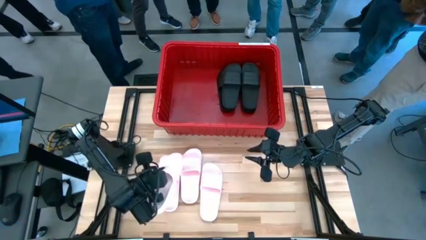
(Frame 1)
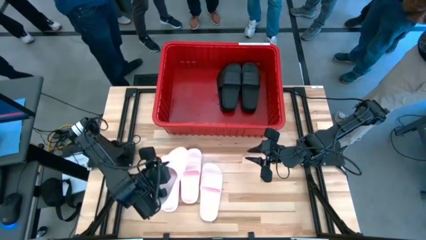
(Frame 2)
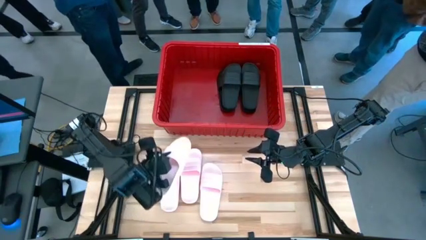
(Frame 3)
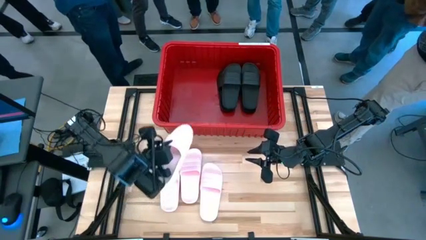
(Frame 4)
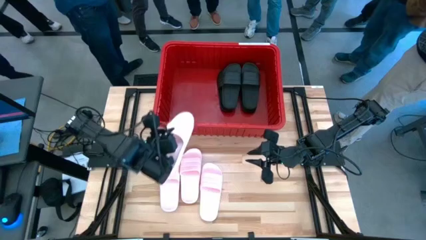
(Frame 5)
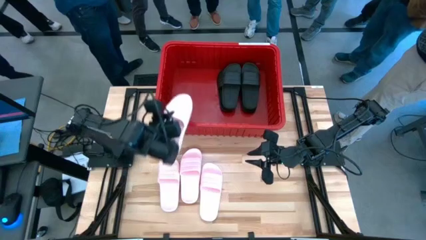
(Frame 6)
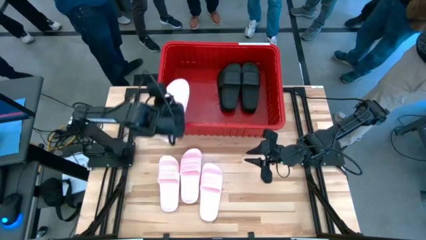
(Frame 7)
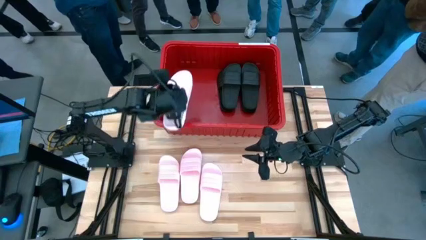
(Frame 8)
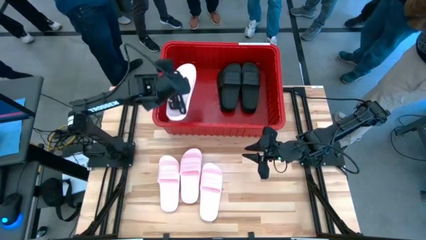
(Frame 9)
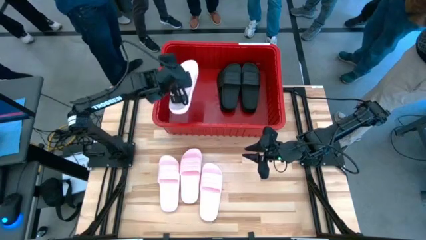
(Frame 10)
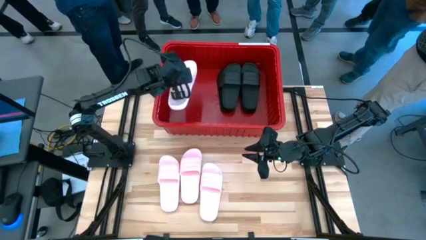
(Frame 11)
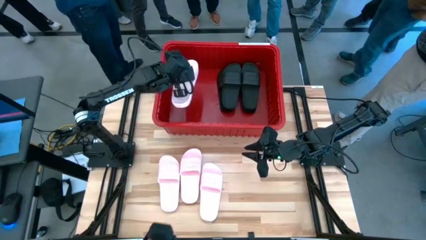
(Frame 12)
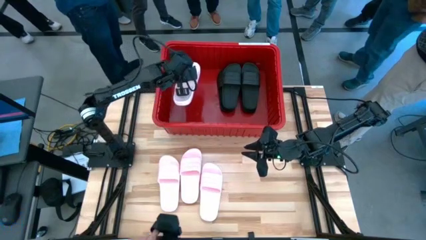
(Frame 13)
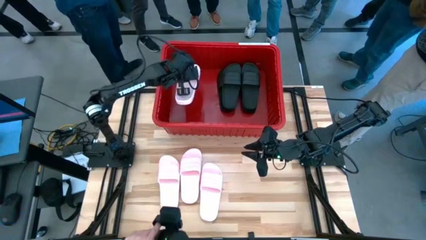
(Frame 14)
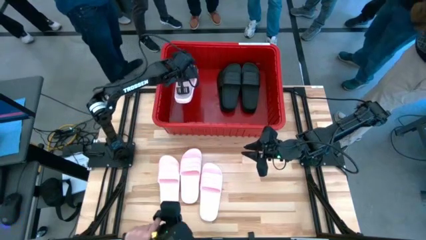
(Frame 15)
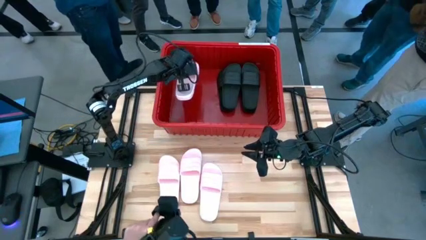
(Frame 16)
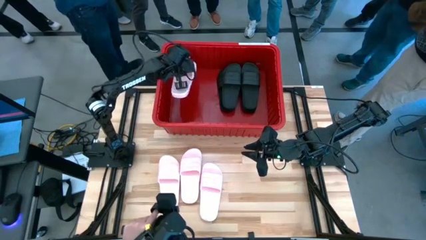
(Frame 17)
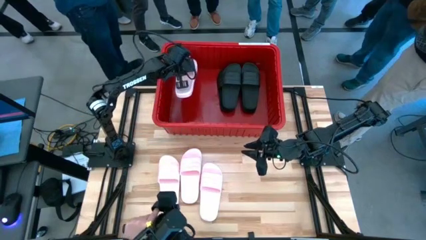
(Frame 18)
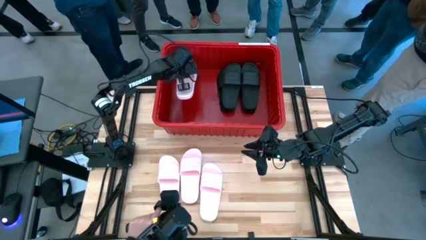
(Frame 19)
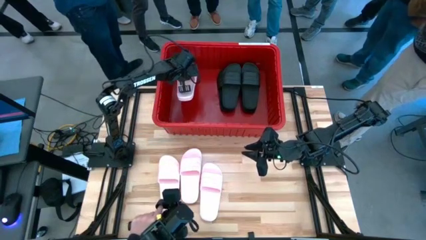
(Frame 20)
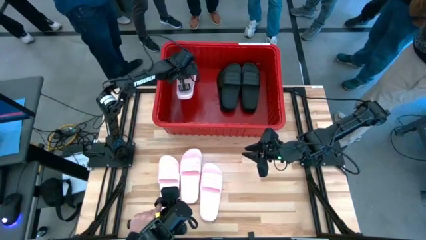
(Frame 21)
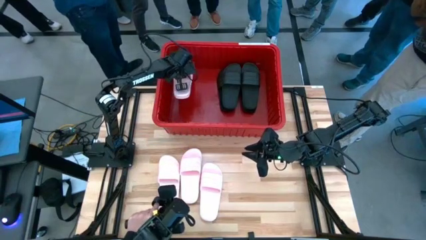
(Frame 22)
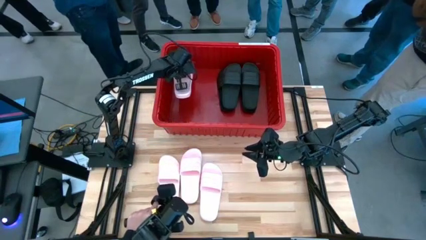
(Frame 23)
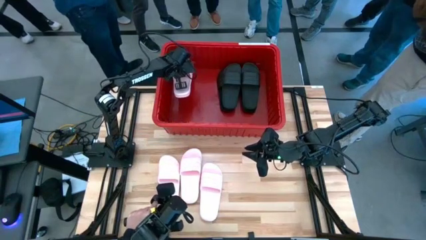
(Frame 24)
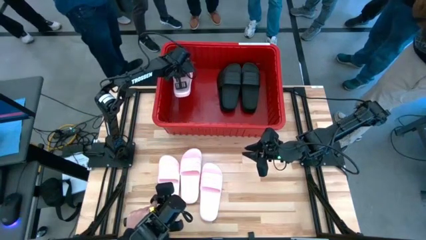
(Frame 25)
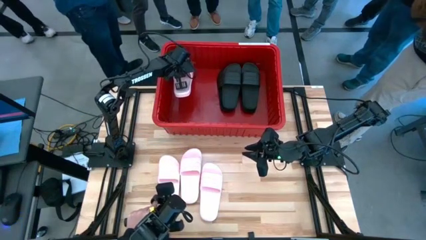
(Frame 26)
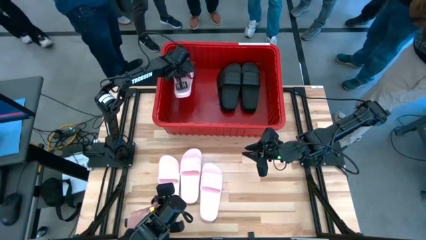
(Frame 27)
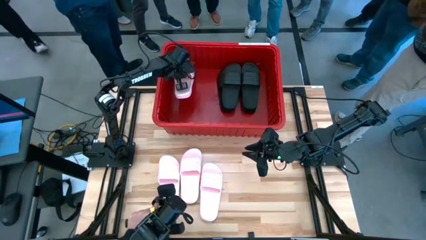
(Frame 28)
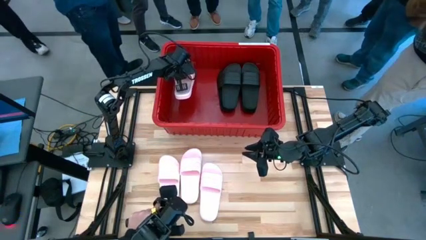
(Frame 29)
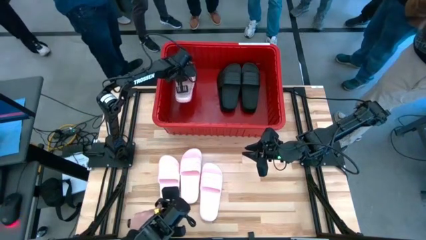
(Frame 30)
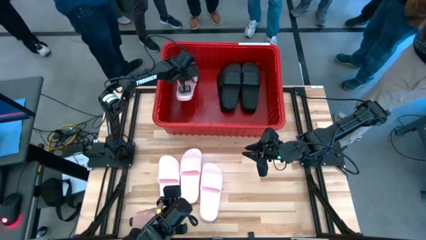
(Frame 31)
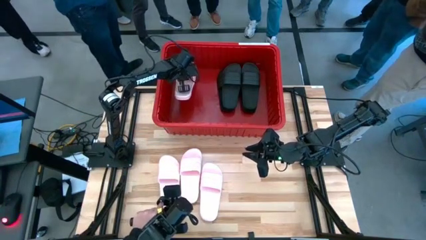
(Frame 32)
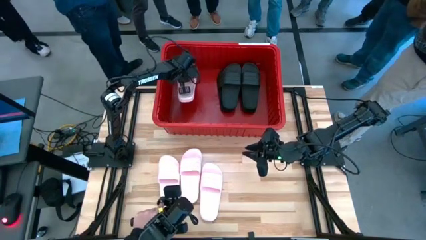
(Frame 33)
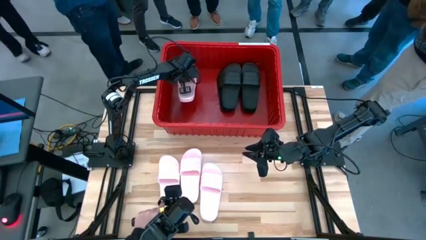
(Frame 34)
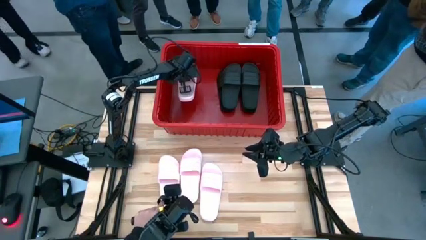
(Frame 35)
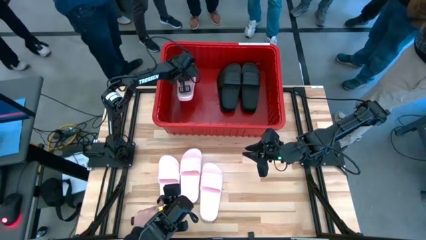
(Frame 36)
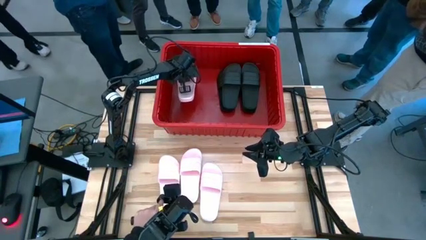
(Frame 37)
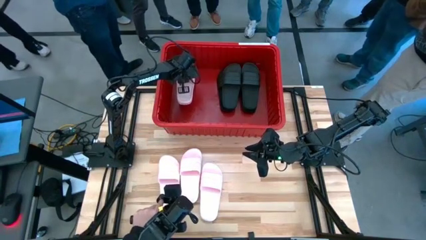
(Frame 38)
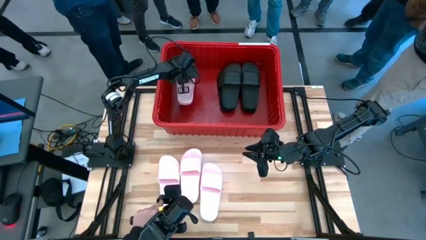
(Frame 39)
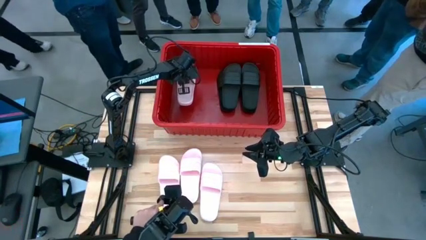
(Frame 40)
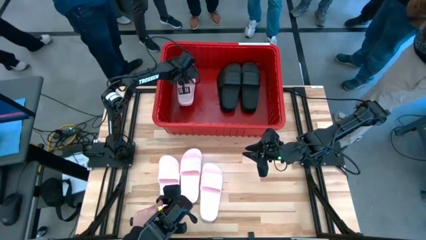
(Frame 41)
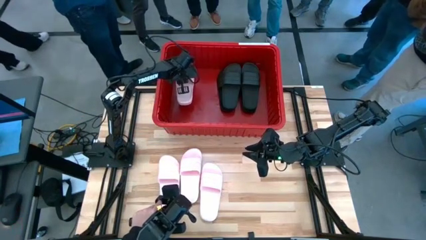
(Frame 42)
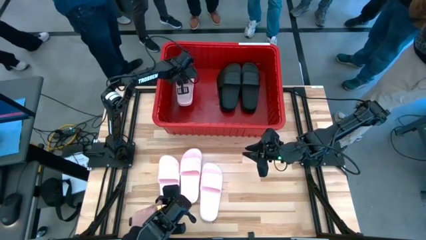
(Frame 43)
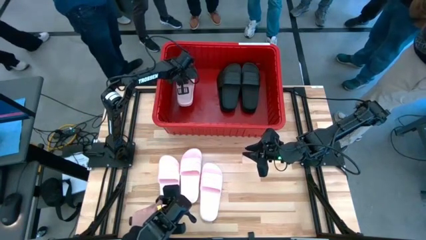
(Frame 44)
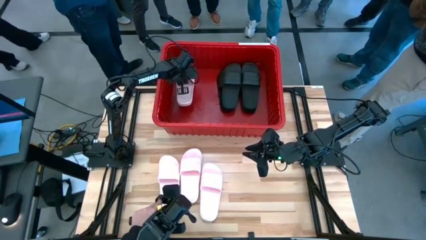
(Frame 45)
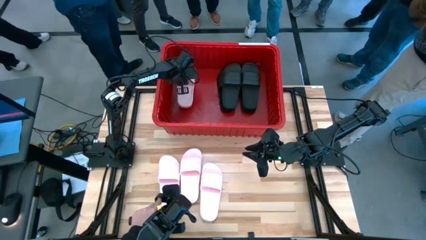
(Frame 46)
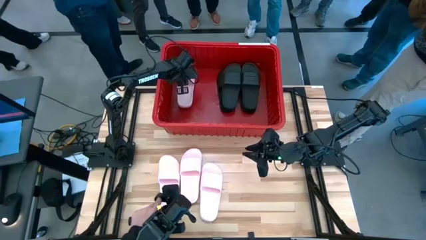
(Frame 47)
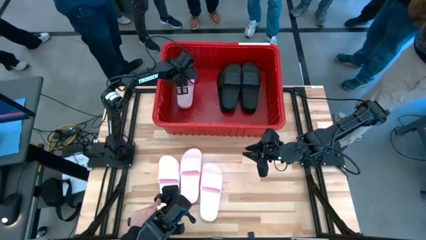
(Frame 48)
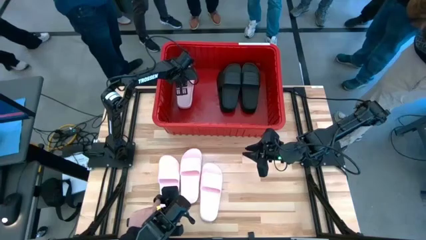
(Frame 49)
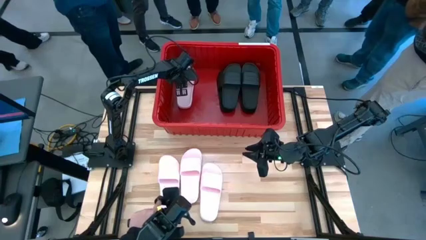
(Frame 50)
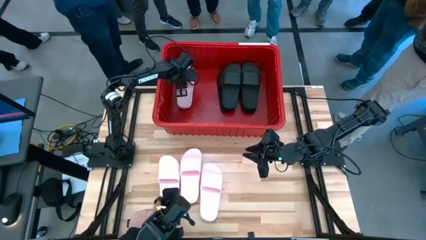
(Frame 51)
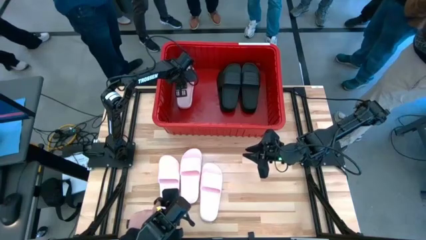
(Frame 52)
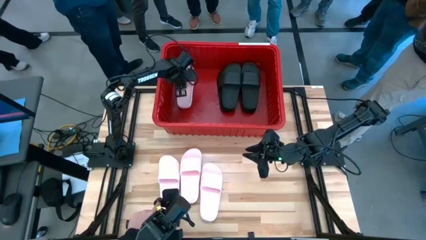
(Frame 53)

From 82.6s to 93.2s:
Task: Pick and place slides into bin
Put the pink slide into the red container

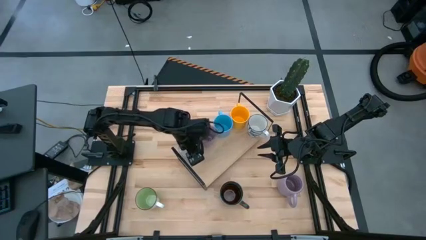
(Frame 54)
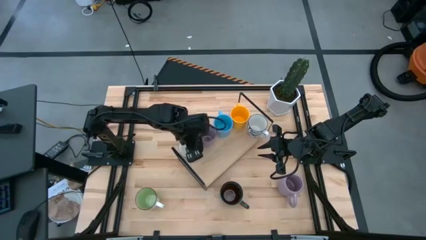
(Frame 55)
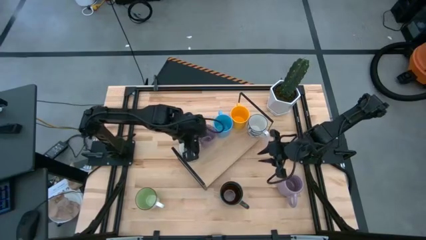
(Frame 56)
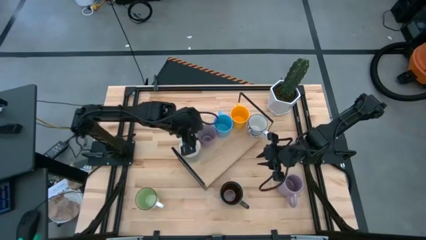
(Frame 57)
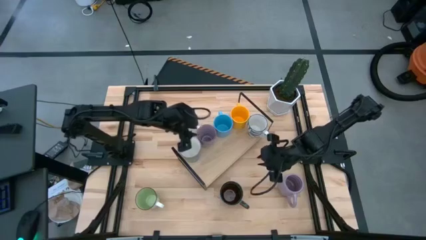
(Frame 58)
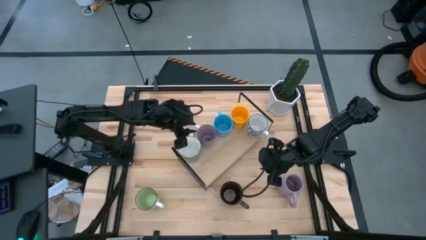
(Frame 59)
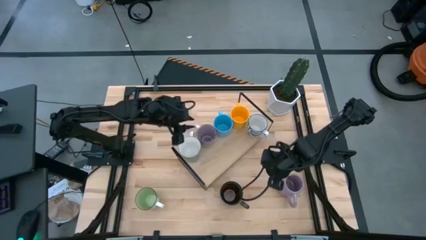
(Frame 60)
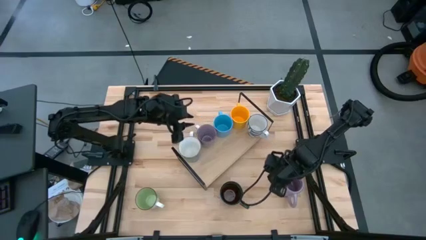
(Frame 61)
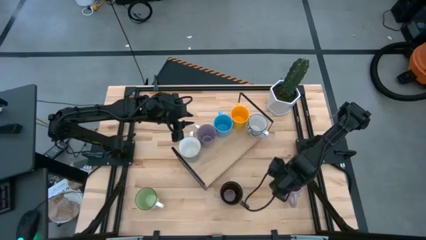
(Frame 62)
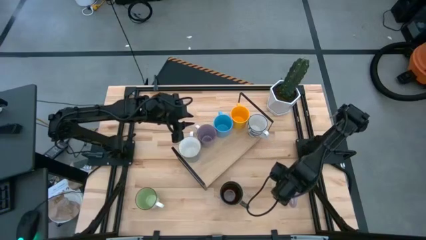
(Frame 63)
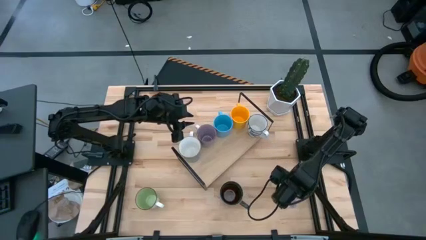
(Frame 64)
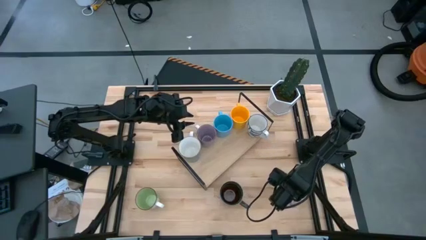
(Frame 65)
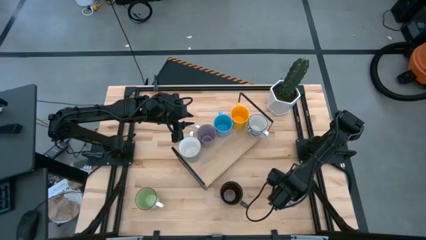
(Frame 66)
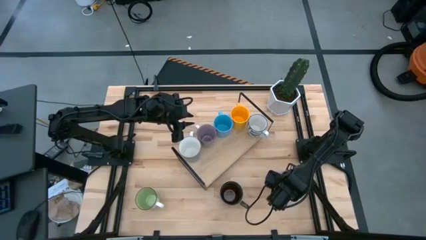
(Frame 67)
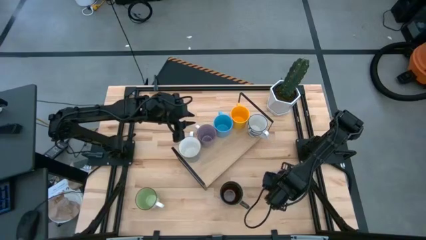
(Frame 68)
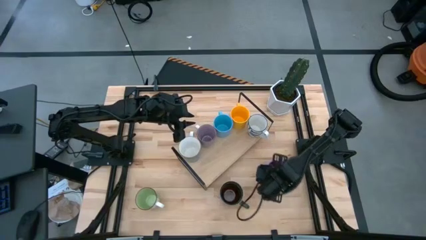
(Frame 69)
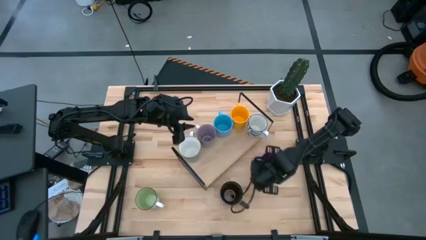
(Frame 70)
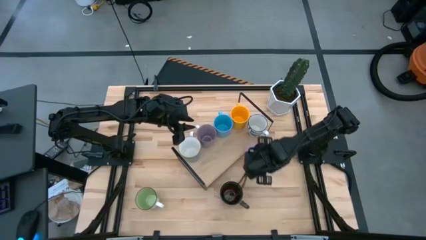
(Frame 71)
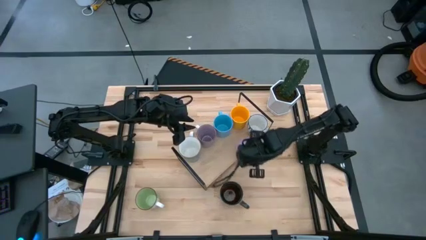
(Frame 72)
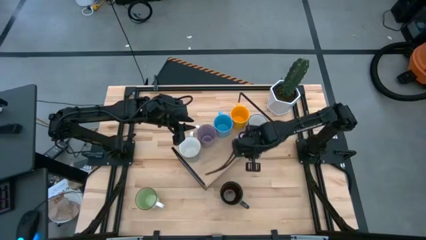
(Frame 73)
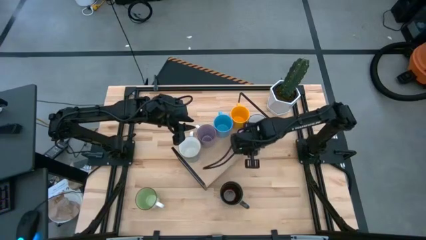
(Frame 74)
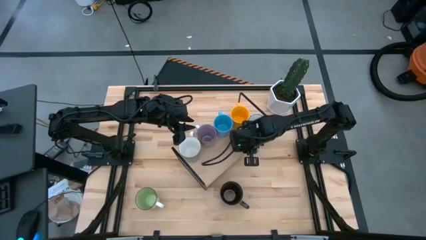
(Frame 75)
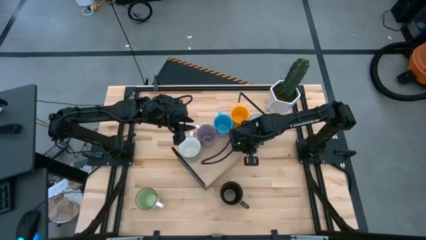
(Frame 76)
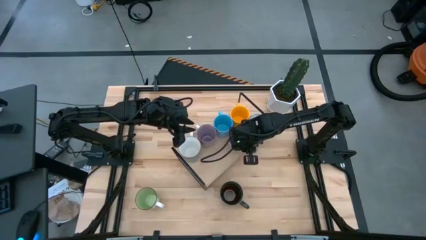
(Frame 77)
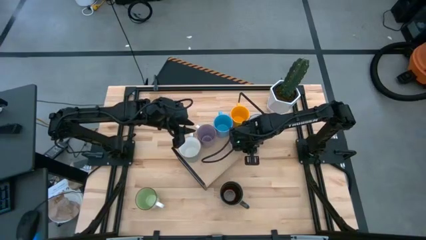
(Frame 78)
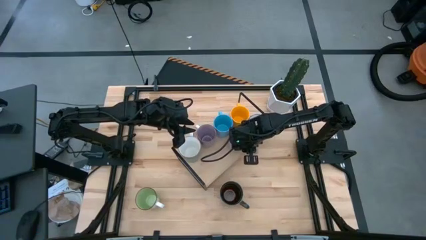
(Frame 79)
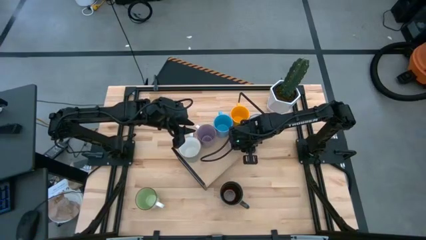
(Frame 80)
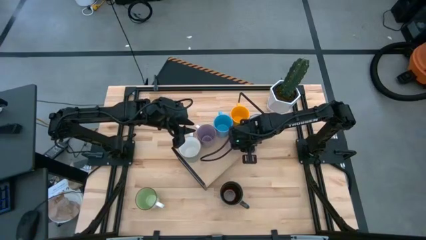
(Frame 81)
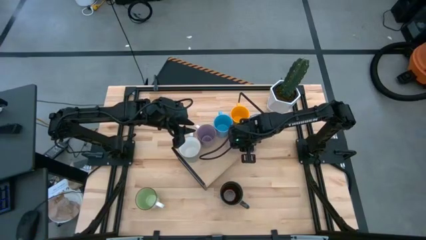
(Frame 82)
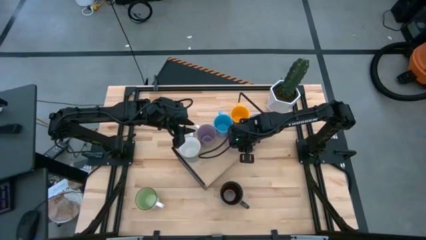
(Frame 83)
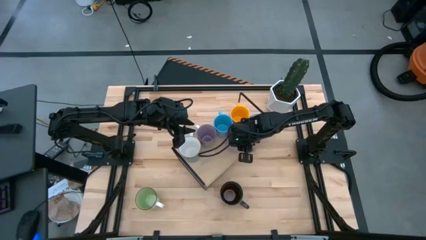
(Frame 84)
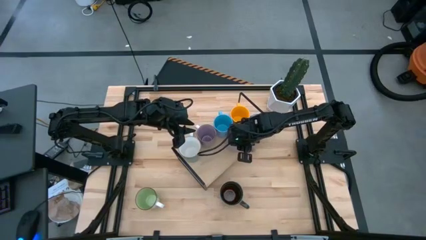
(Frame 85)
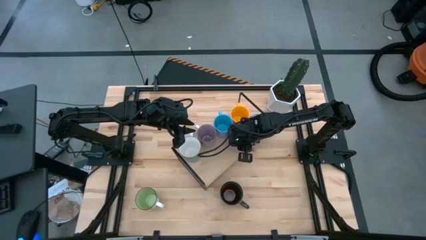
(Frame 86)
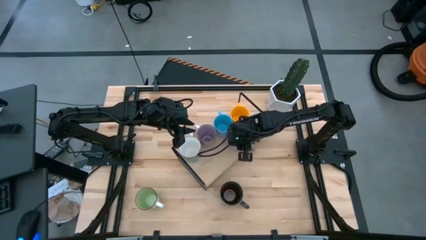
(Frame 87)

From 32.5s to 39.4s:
Task: Place coffee mugs
Put the purple mug onto the shelf
